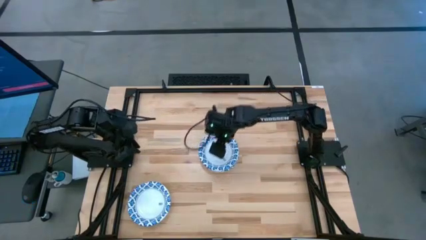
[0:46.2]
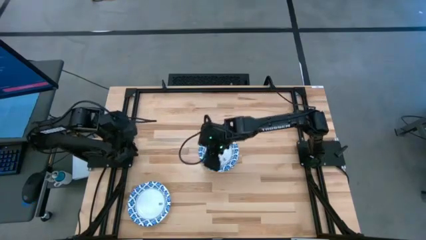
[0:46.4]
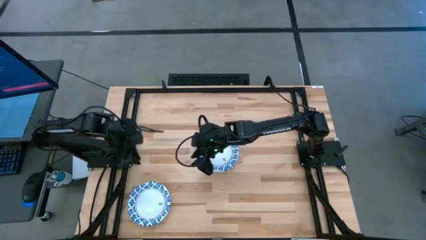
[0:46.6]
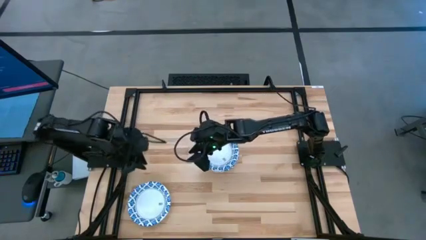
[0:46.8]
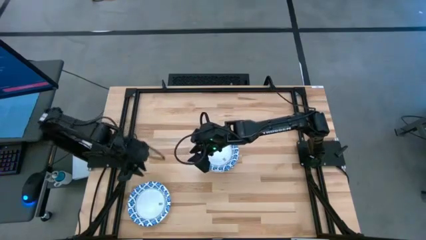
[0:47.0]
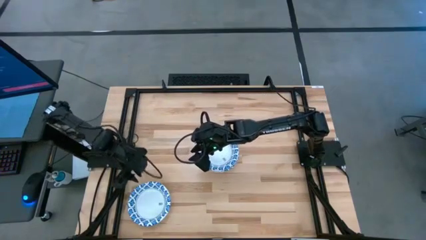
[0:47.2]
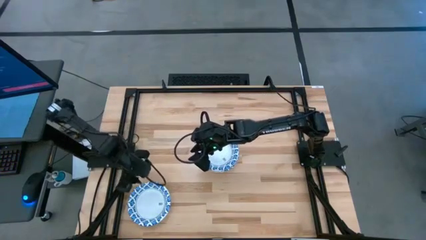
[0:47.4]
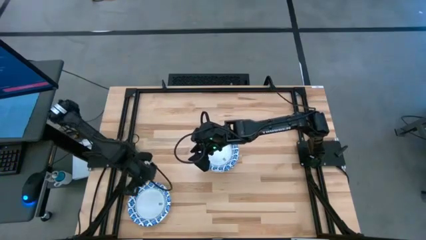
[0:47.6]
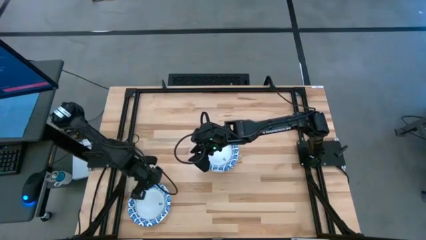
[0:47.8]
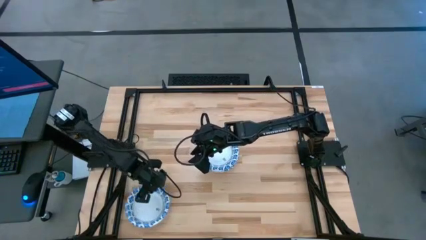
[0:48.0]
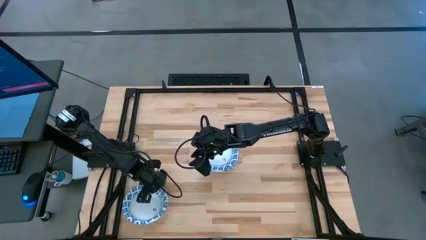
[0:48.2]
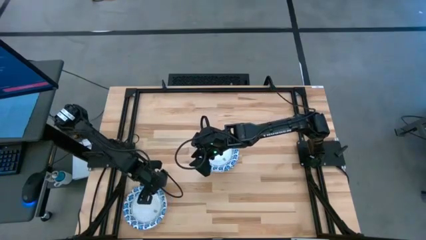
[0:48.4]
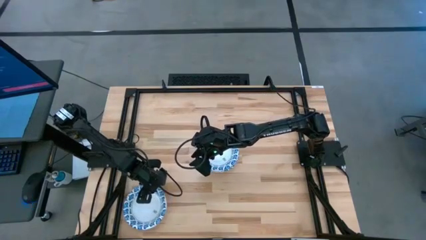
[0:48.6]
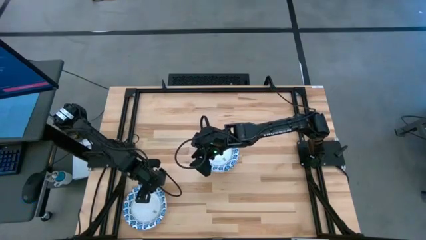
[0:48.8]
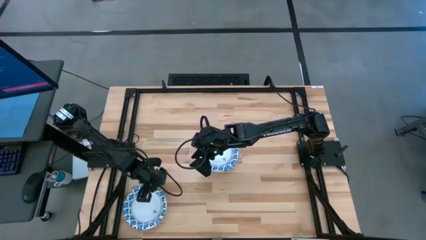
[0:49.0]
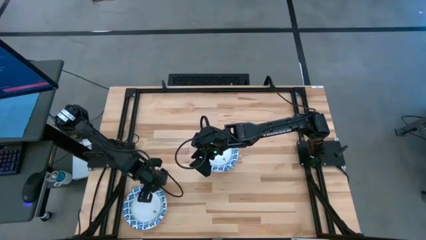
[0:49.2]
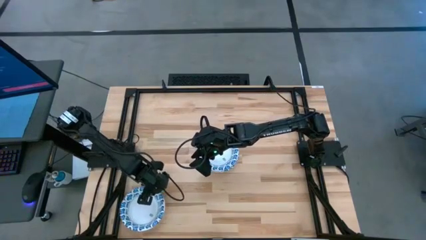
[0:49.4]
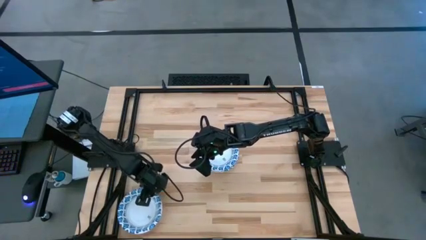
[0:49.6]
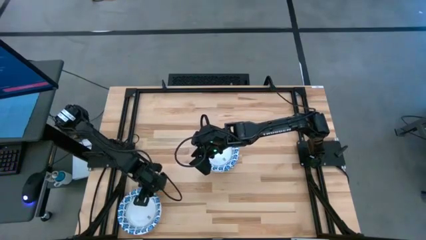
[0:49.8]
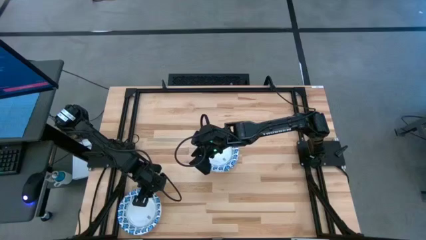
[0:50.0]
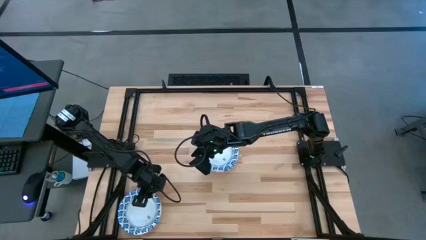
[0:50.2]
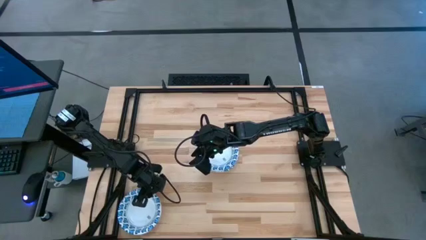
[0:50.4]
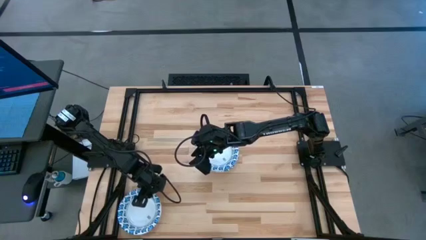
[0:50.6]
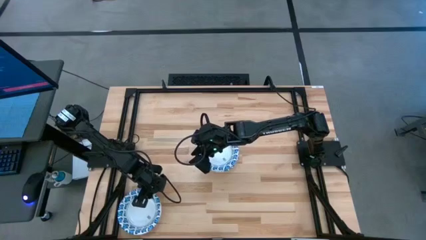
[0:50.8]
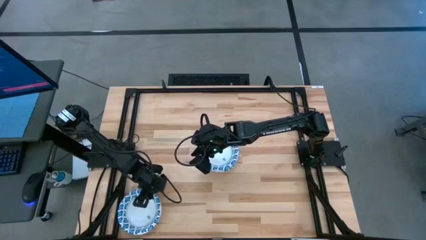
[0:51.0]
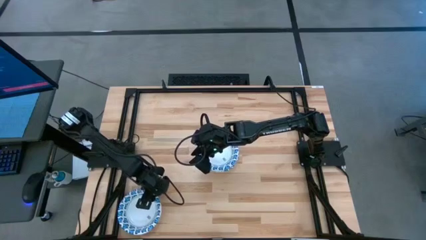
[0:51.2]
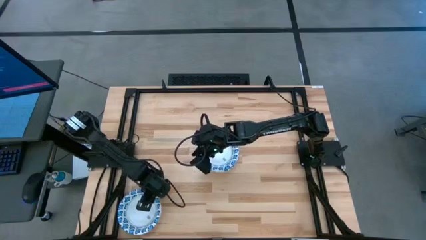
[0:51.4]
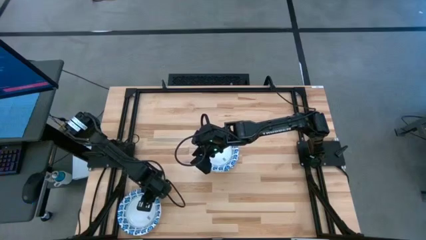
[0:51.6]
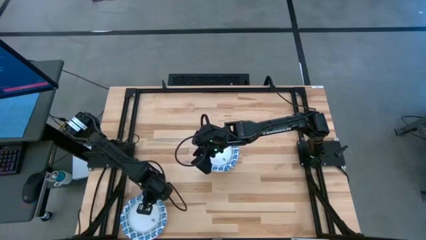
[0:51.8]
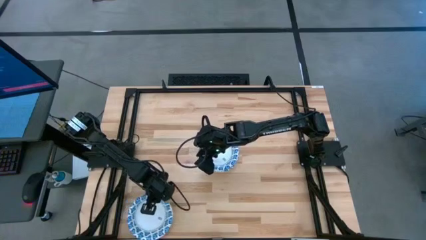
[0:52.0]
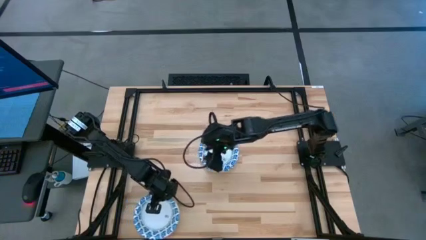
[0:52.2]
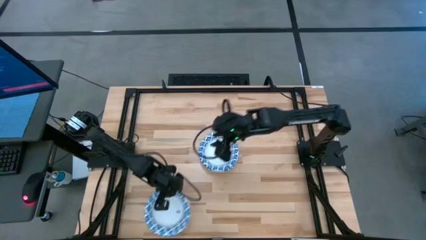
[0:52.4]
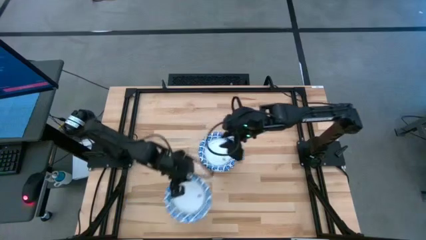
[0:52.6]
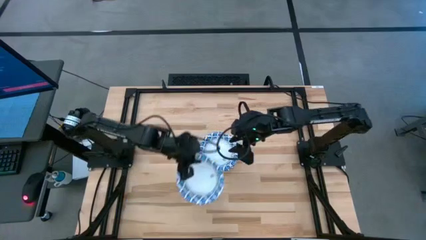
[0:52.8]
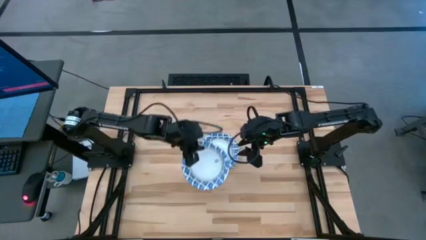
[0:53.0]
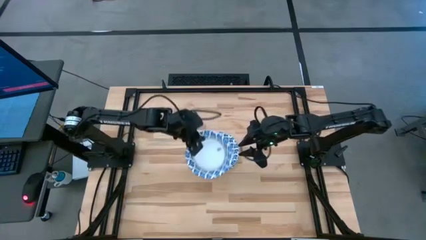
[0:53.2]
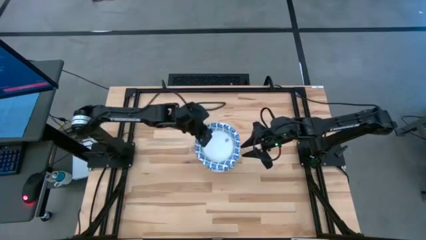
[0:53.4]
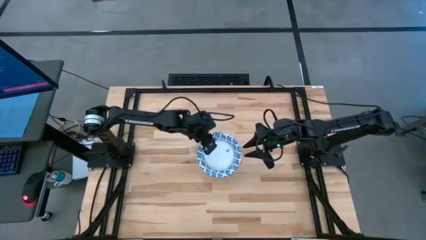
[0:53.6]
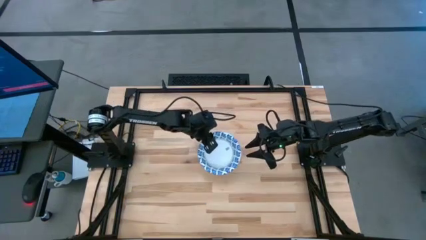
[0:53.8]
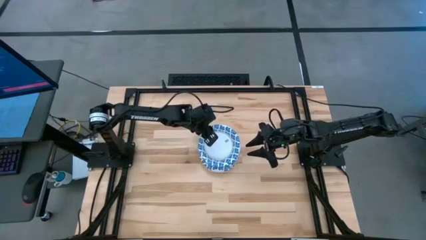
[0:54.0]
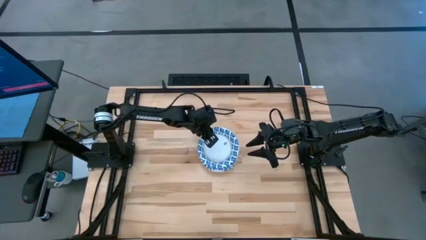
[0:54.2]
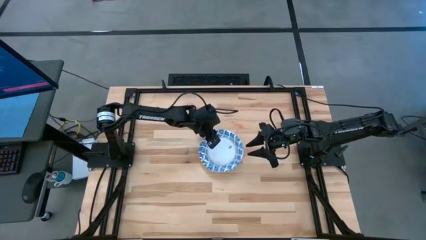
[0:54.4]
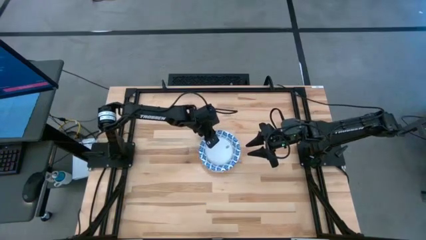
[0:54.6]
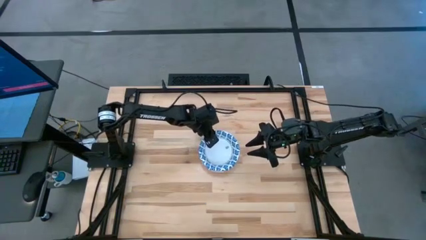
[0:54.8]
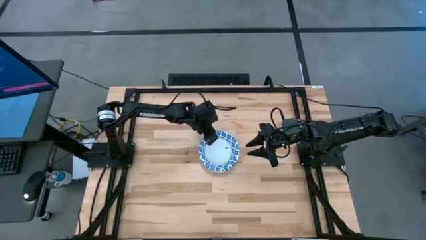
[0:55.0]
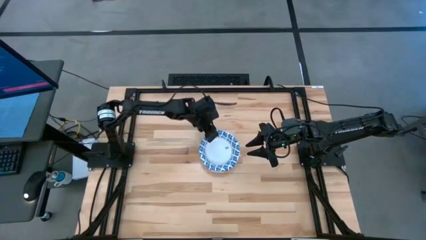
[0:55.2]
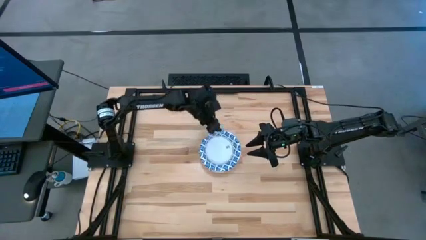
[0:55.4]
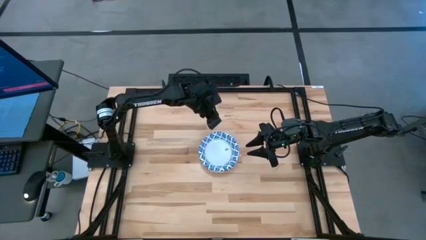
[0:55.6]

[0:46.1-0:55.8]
Task: Nest bowls inside each other
Stack the white bowl on top of the other white bowl
